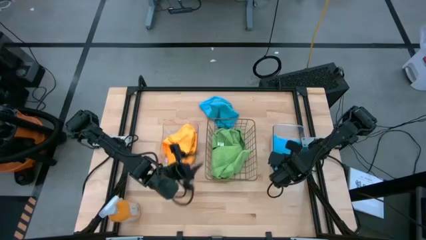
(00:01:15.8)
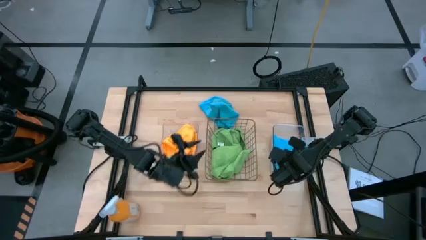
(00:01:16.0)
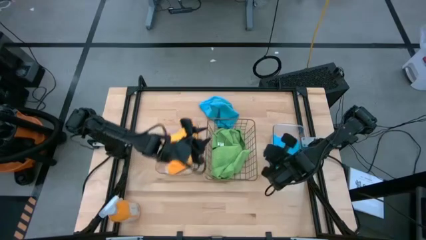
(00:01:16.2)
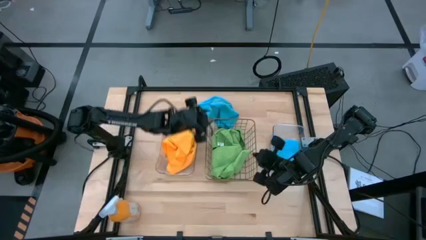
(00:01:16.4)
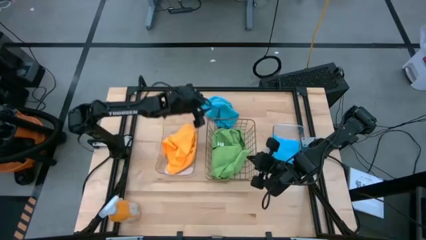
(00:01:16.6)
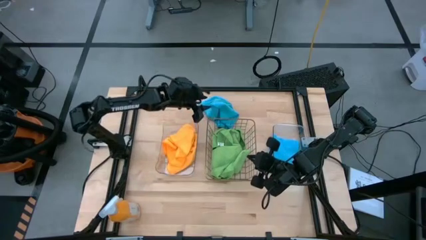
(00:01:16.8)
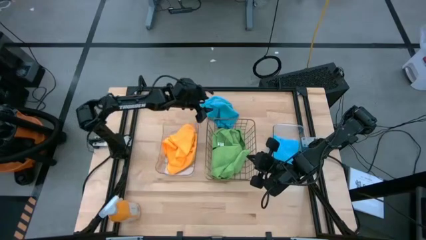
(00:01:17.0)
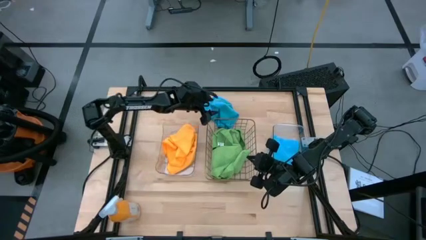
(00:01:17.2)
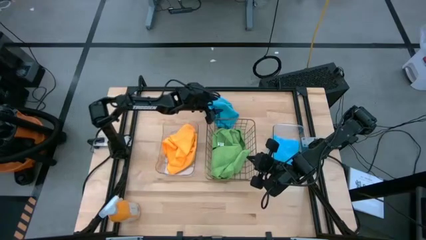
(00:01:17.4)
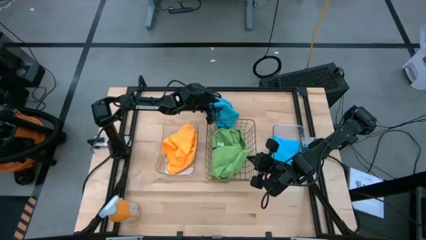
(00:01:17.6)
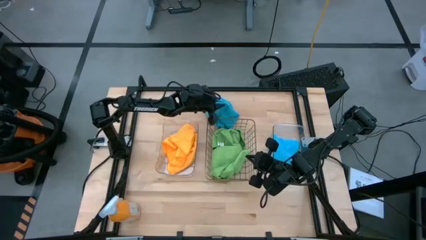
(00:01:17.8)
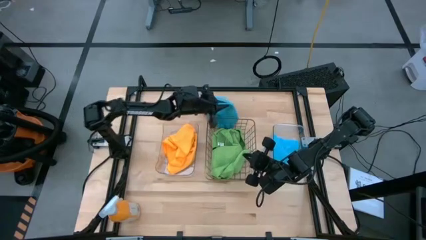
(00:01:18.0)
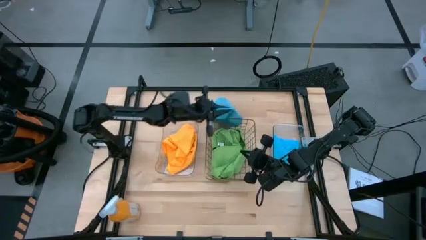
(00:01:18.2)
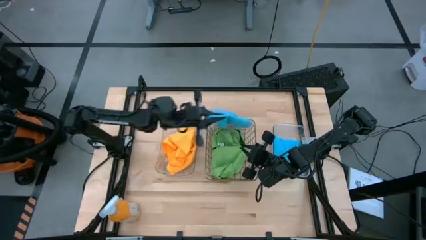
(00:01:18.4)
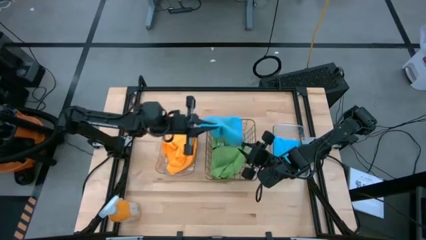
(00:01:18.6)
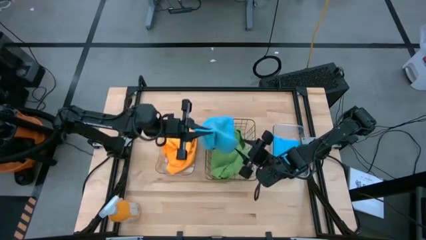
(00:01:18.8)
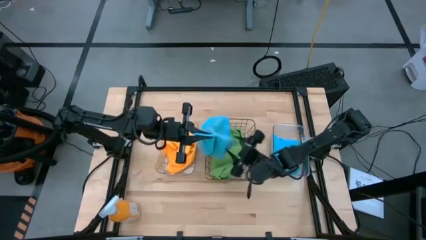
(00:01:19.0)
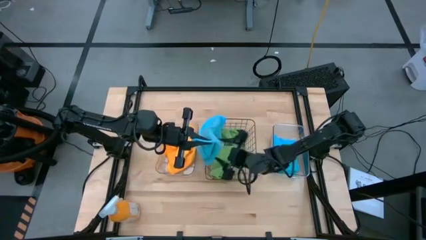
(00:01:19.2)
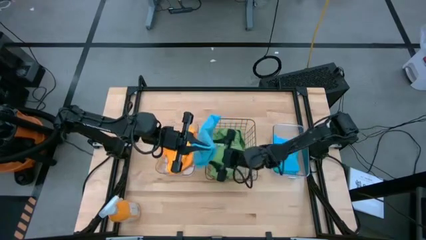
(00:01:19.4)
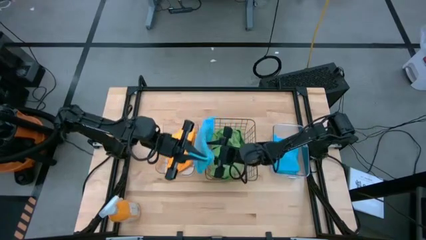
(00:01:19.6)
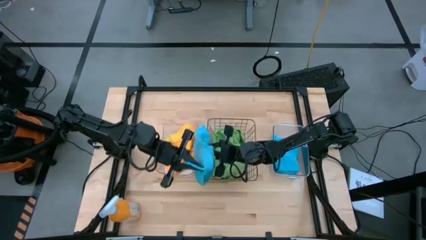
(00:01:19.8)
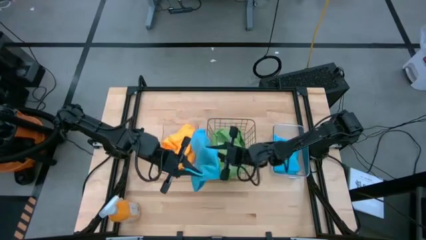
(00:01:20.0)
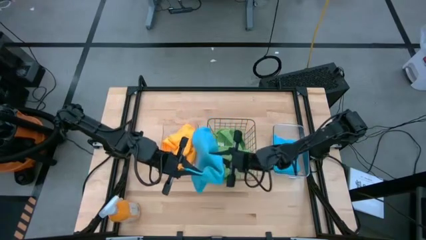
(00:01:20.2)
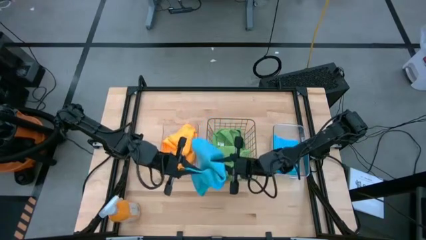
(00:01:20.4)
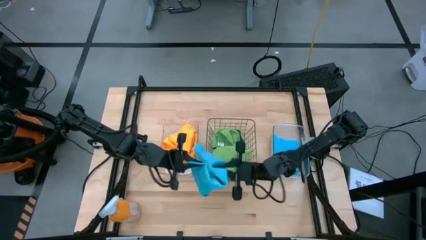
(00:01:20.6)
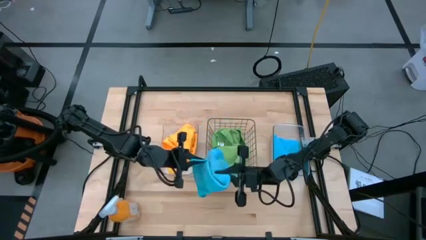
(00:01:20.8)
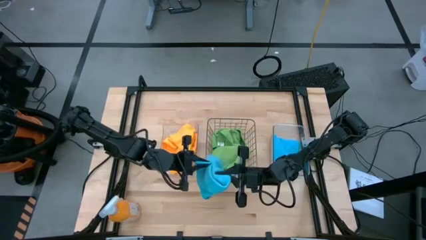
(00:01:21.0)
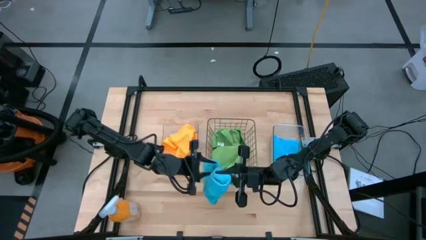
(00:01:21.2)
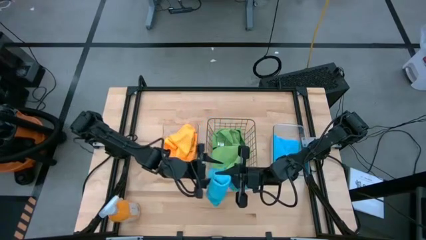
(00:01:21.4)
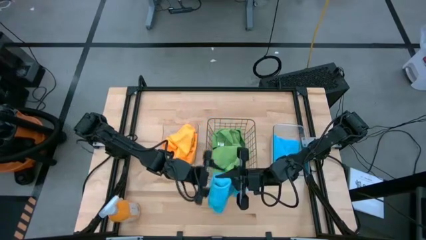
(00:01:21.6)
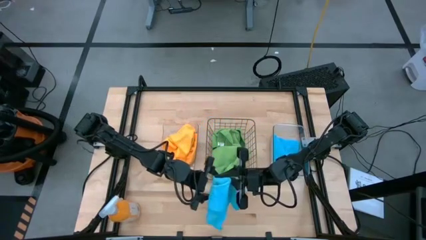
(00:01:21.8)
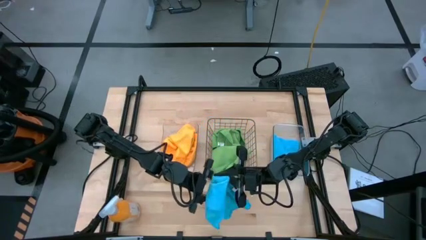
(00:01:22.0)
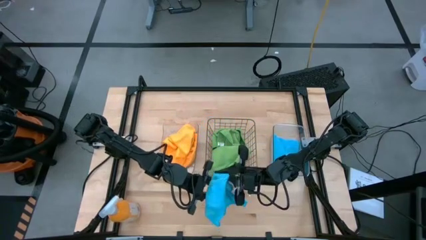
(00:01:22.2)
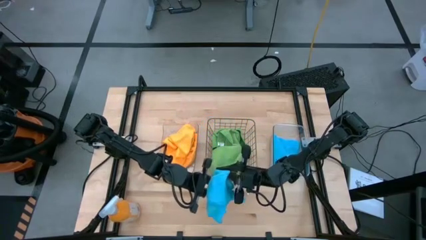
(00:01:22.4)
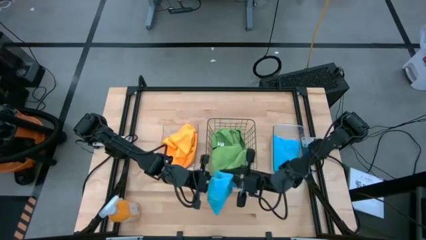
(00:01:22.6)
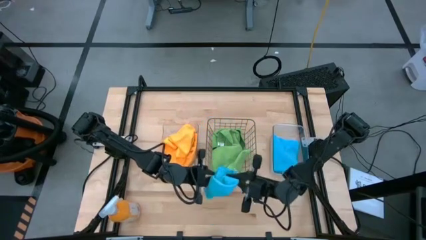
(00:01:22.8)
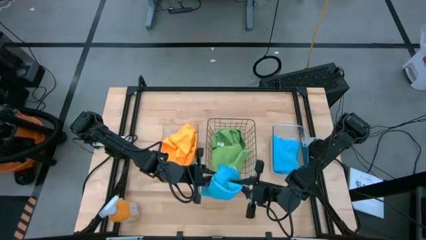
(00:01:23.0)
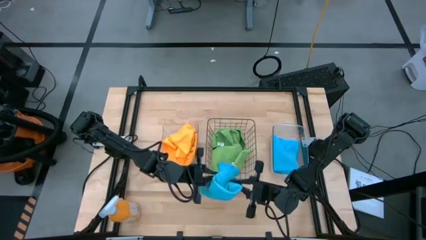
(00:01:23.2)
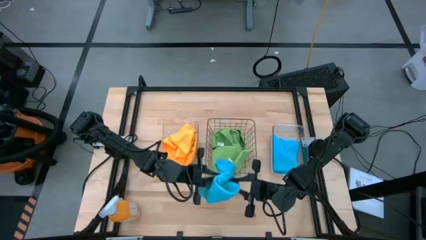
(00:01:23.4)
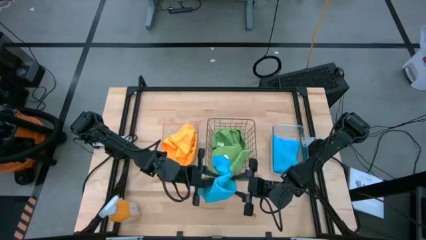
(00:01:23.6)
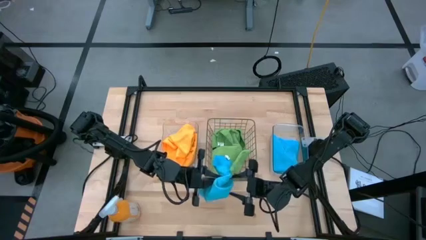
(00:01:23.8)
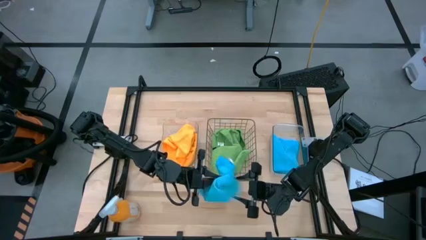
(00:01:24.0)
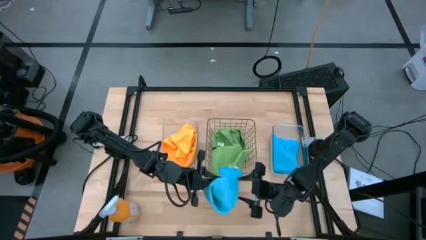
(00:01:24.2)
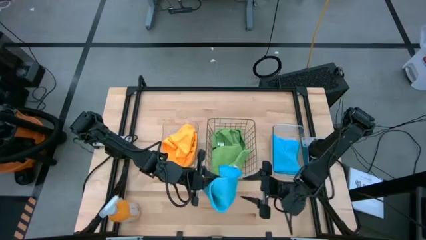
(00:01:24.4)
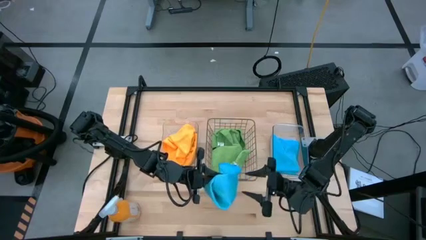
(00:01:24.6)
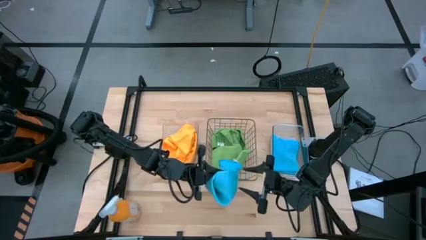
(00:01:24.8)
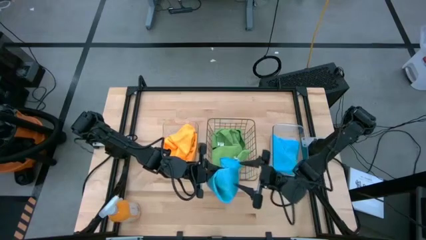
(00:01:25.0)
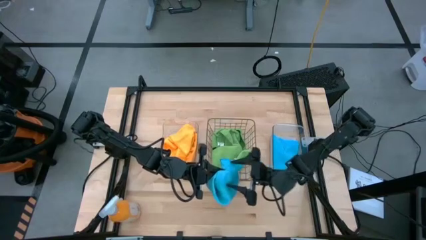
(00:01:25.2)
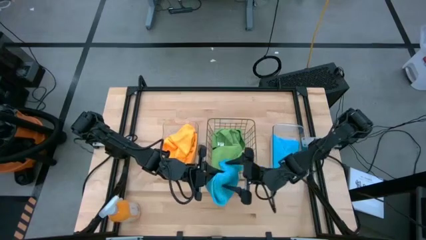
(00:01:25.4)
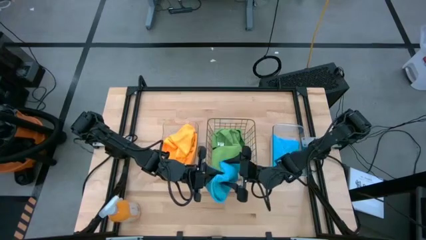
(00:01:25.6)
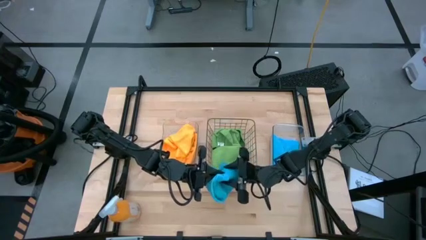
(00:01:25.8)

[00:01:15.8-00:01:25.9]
Task: Sort microfiber towel by color & place in baskets
Put the blue microfiber towel into the right transparent bin

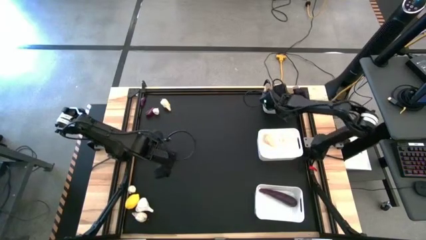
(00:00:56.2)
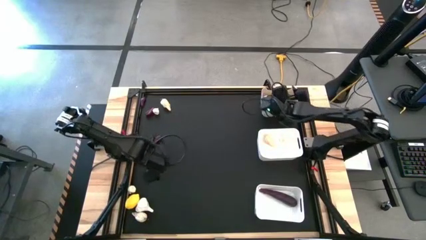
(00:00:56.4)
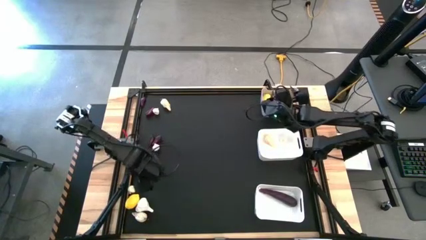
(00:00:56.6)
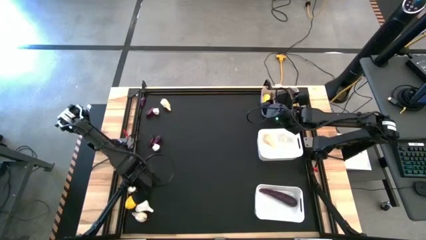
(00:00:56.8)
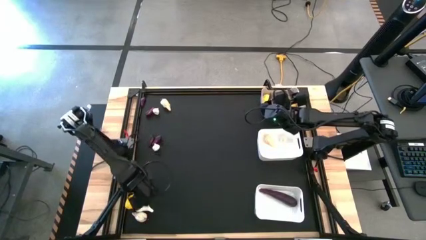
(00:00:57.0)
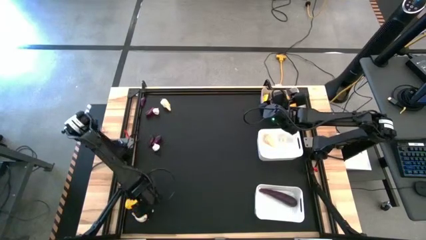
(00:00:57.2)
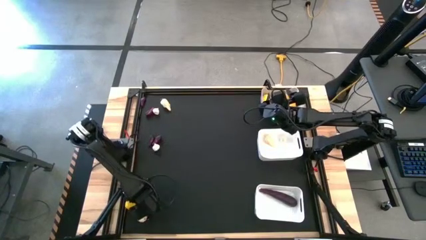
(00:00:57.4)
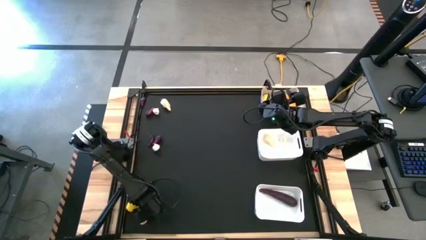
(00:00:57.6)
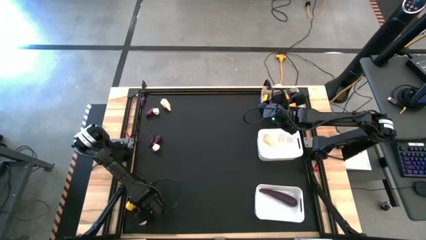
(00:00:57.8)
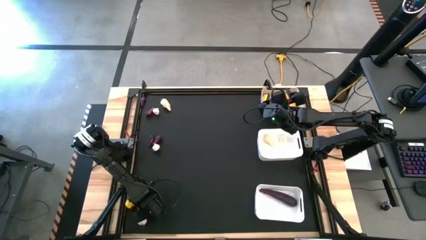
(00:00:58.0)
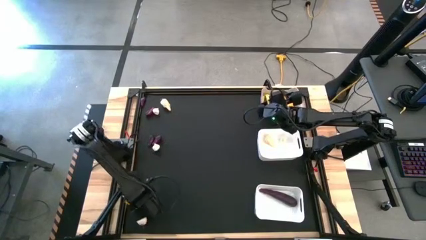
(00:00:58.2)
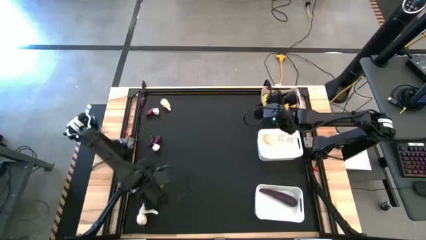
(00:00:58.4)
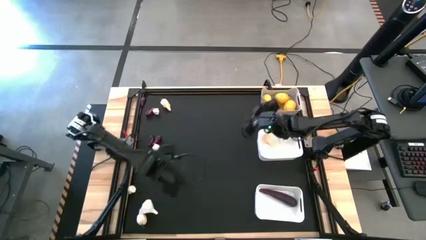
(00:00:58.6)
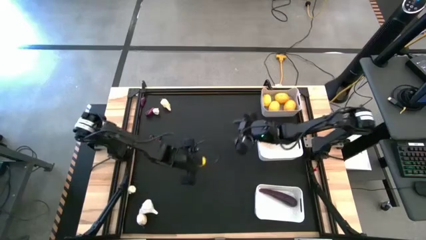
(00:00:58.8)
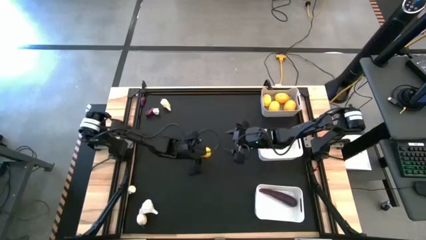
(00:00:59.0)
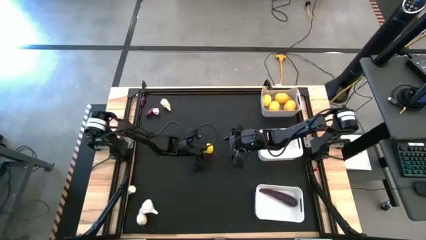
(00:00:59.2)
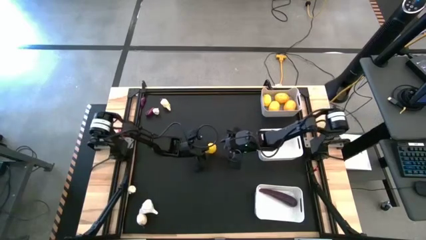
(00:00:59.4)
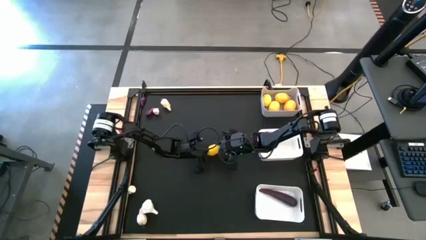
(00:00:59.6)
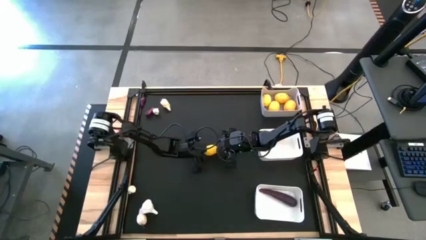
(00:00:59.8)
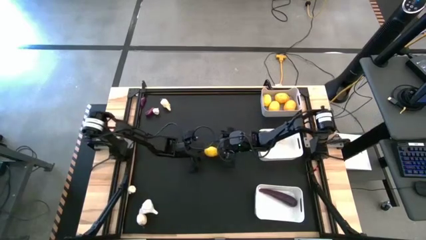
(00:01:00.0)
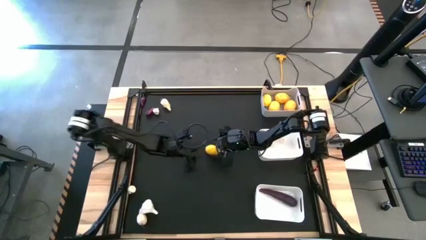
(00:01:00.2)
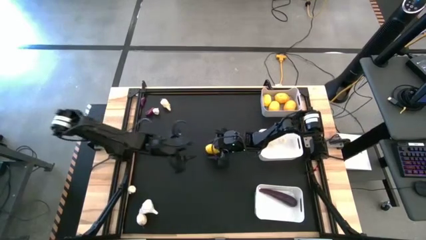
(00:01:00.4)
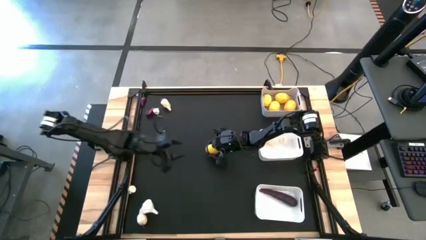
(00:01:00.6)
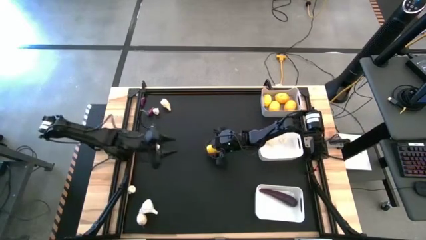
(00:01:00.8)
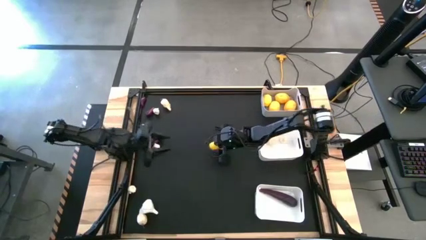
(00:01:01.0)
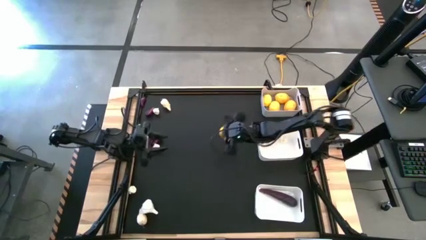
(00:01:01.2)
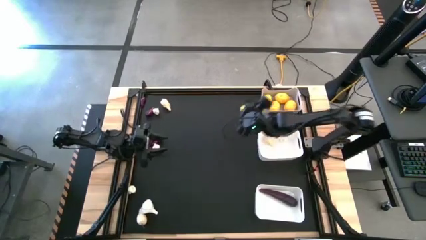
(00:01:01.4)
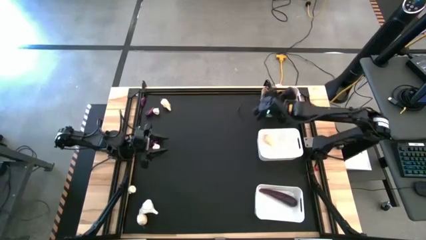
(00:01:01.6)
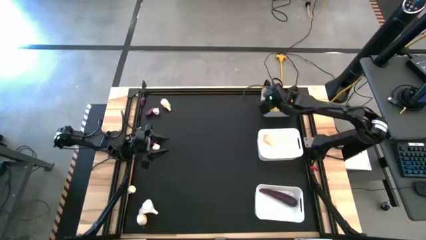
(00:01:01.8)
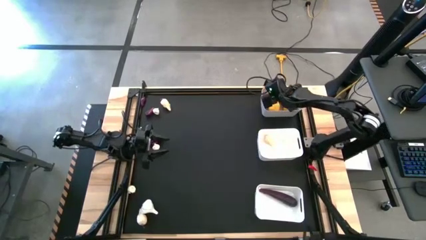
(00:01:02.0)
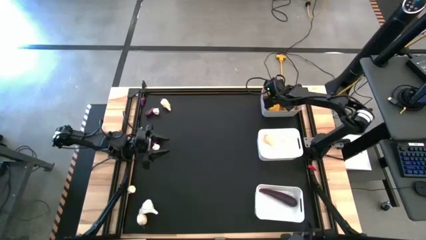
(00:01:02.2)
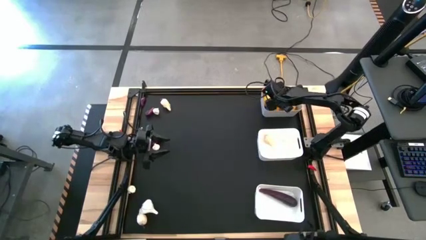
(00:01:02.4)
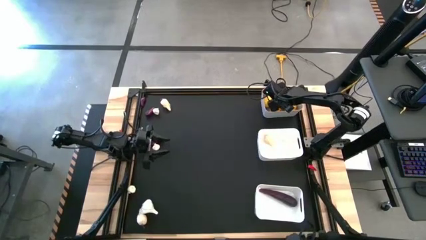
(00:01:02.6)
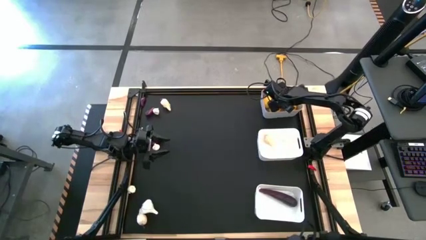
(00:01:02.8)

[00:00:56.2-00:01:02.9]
Task: Sort produce into baskets
Put the lemon into the gray bin
